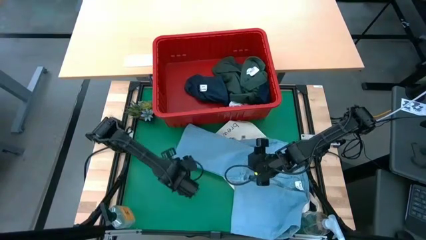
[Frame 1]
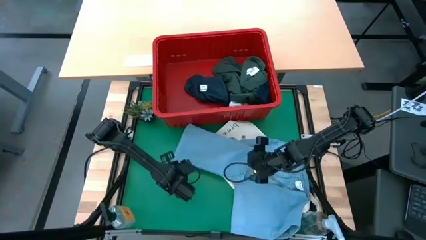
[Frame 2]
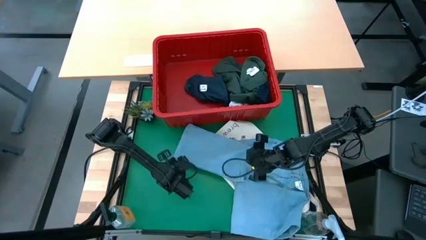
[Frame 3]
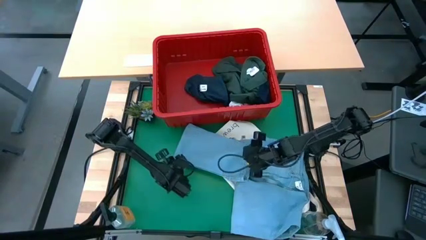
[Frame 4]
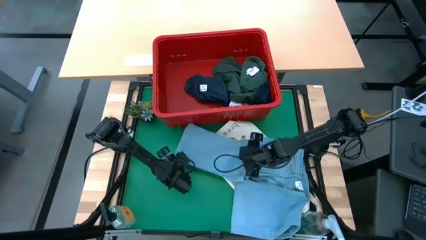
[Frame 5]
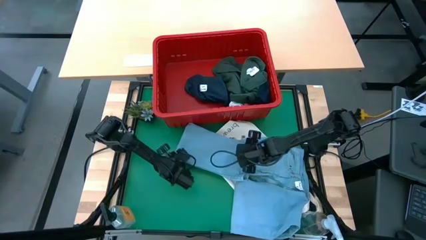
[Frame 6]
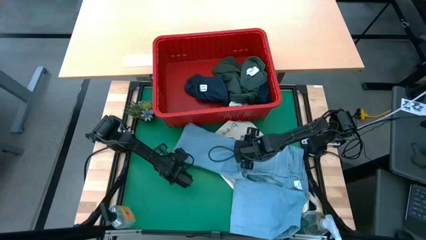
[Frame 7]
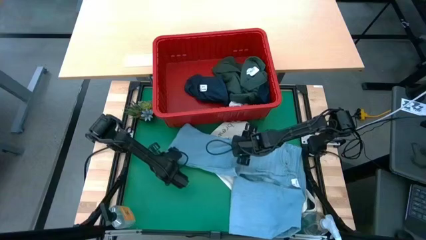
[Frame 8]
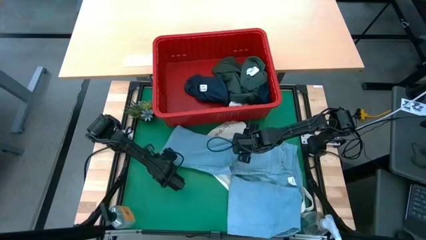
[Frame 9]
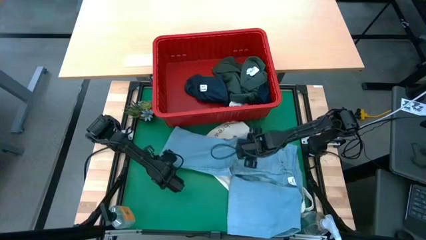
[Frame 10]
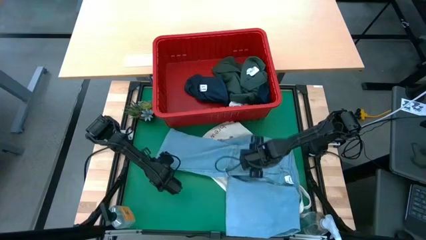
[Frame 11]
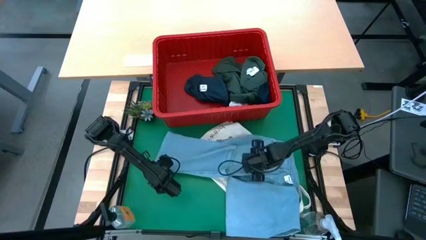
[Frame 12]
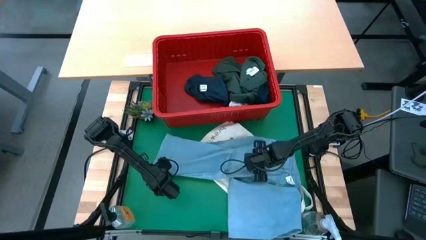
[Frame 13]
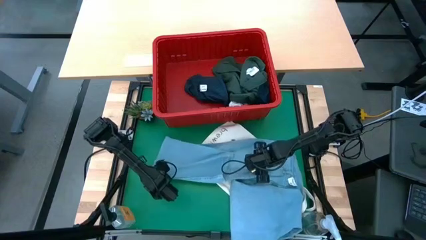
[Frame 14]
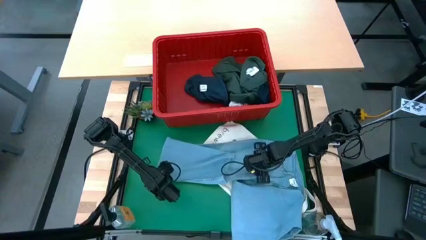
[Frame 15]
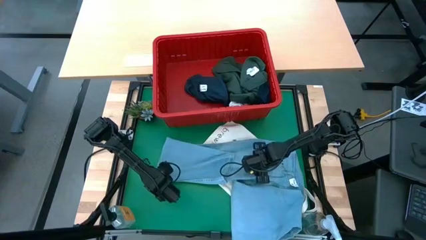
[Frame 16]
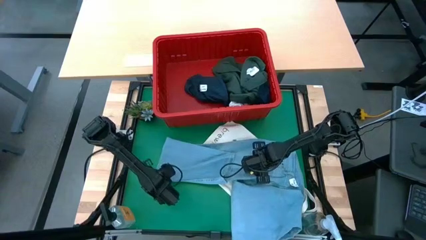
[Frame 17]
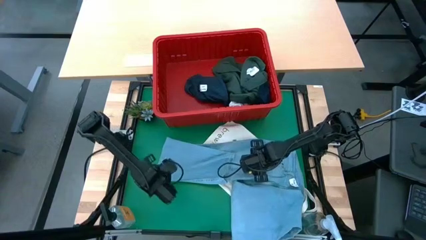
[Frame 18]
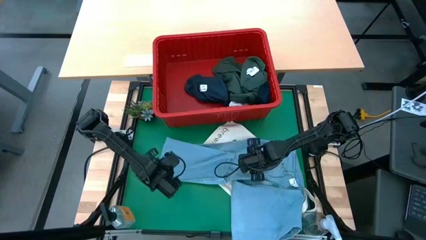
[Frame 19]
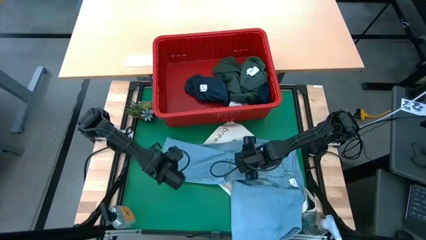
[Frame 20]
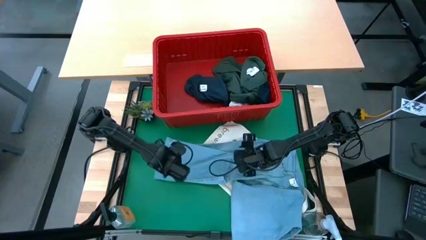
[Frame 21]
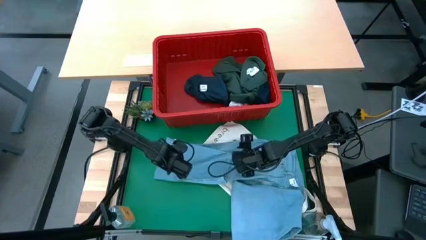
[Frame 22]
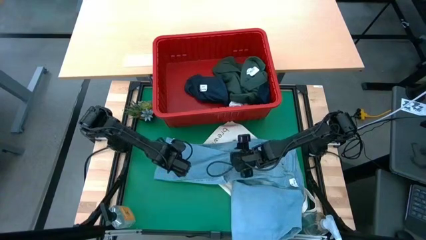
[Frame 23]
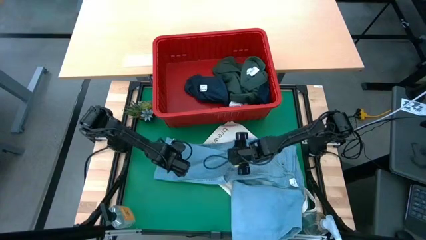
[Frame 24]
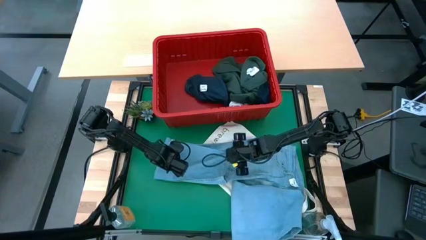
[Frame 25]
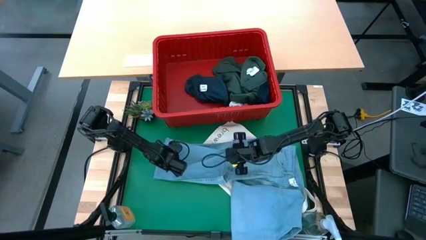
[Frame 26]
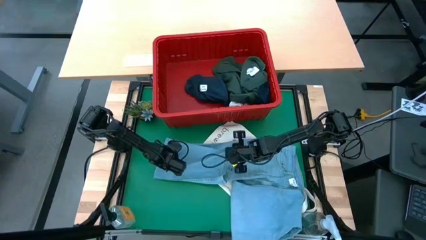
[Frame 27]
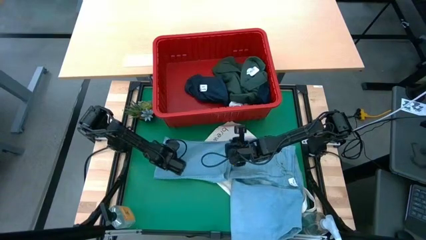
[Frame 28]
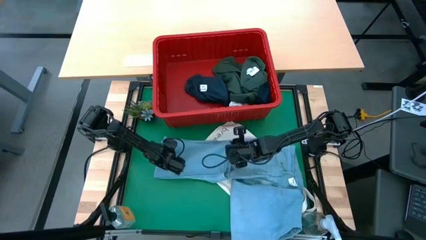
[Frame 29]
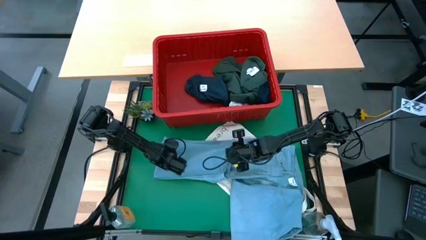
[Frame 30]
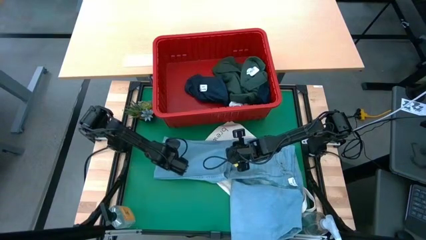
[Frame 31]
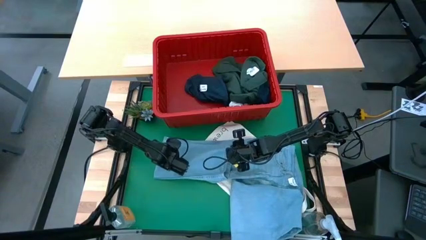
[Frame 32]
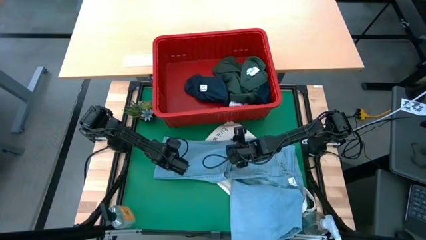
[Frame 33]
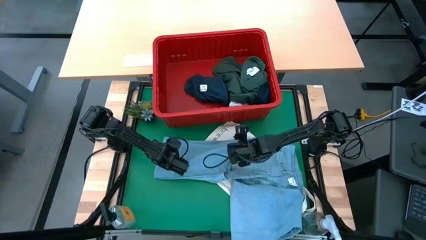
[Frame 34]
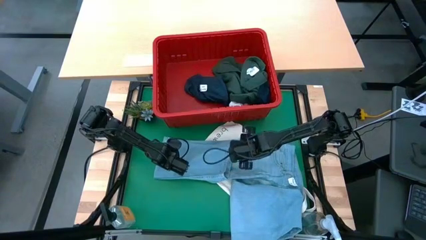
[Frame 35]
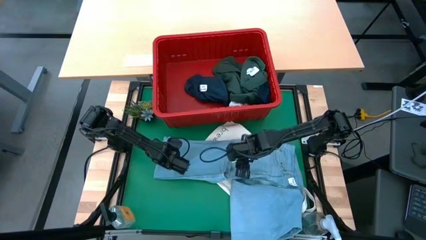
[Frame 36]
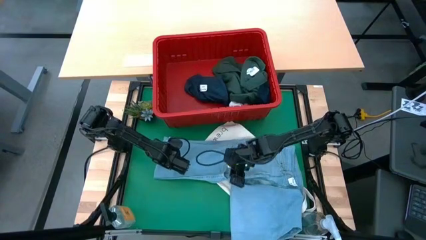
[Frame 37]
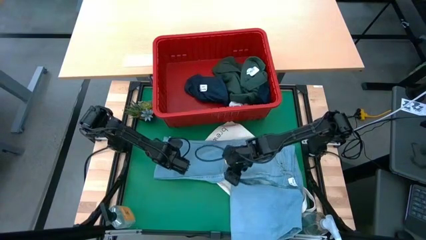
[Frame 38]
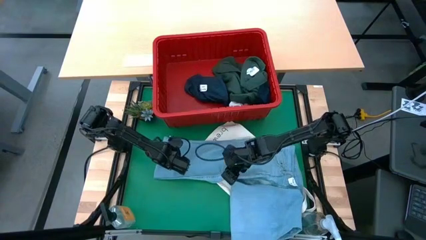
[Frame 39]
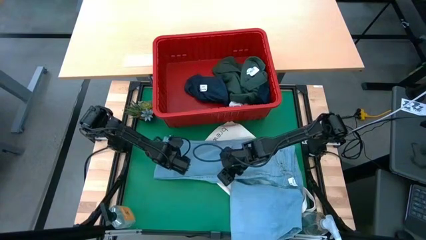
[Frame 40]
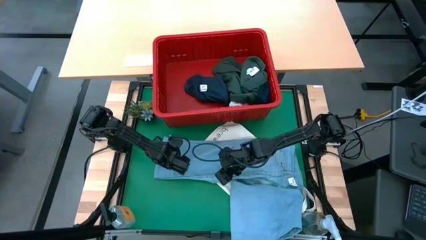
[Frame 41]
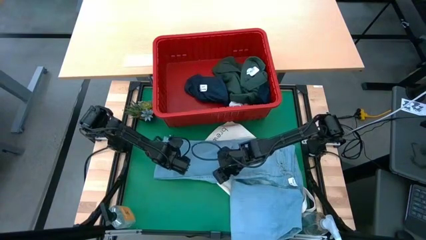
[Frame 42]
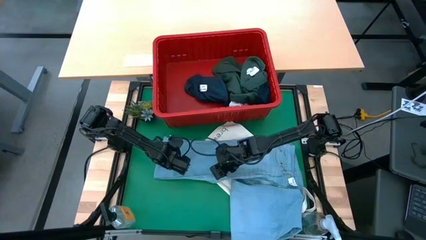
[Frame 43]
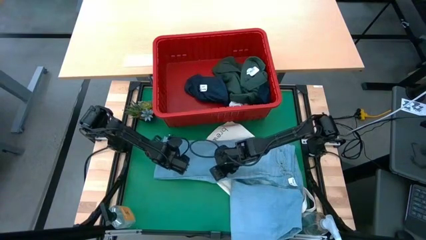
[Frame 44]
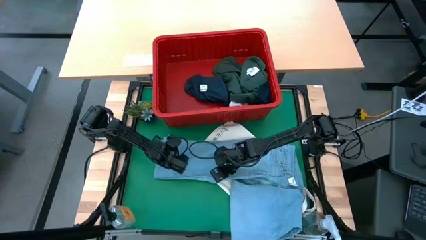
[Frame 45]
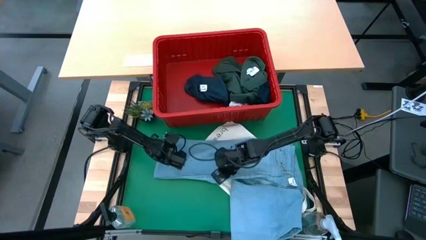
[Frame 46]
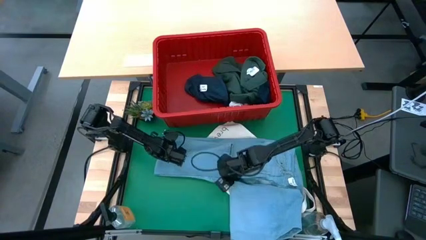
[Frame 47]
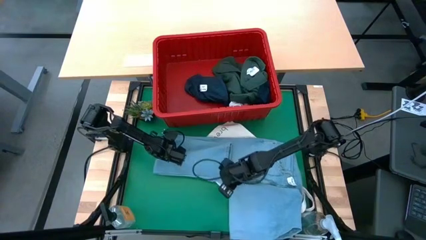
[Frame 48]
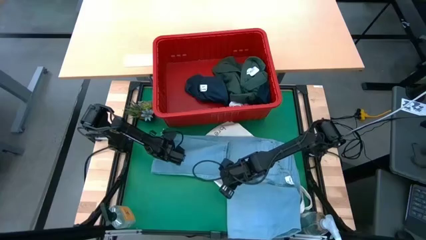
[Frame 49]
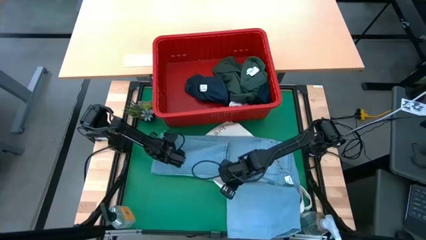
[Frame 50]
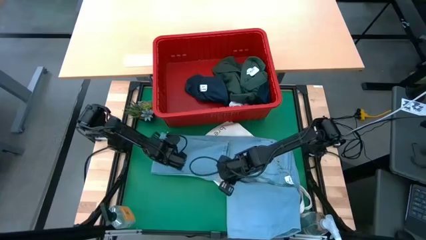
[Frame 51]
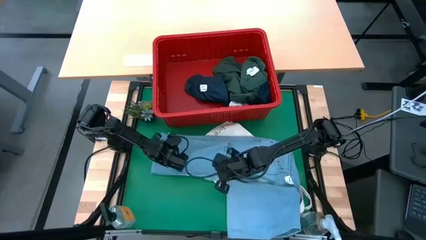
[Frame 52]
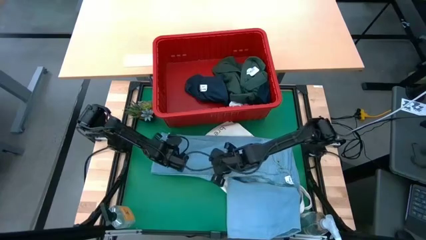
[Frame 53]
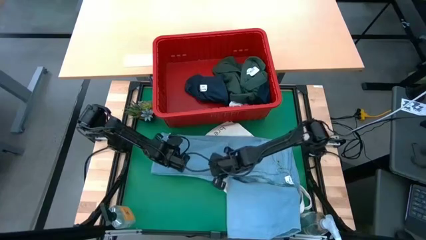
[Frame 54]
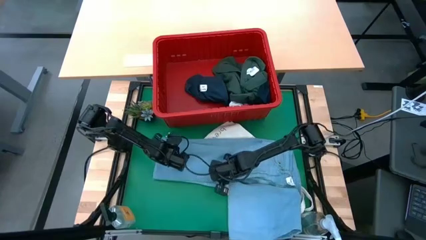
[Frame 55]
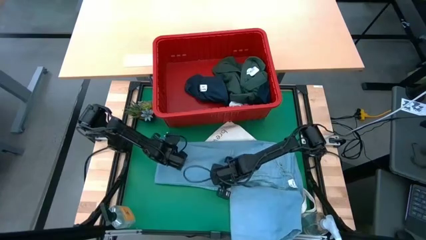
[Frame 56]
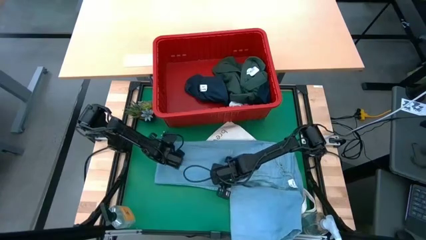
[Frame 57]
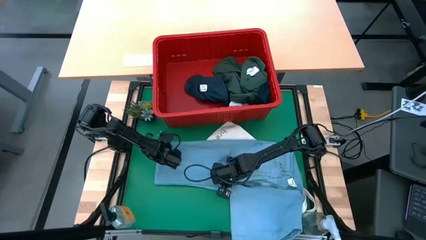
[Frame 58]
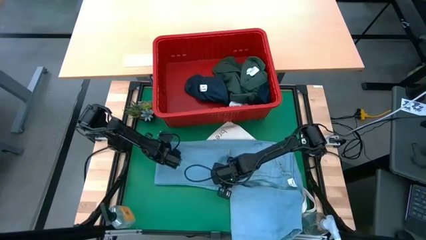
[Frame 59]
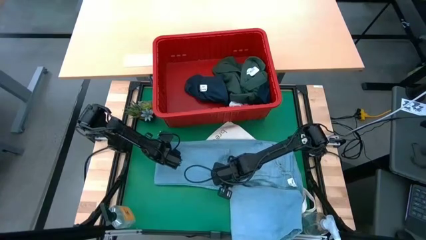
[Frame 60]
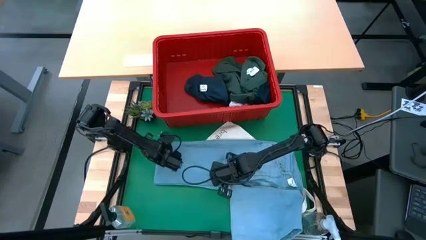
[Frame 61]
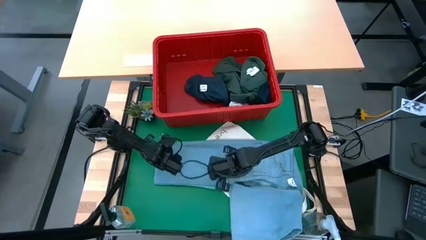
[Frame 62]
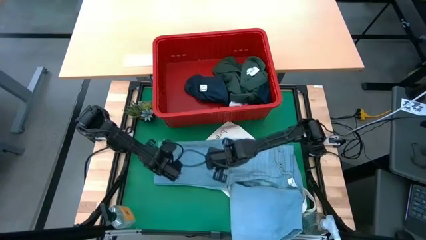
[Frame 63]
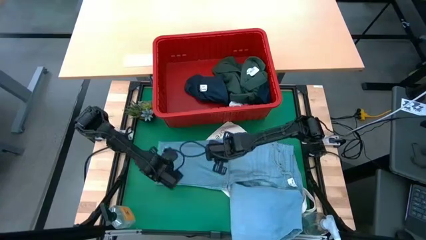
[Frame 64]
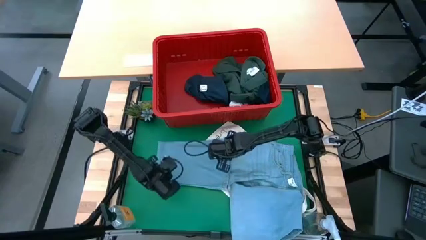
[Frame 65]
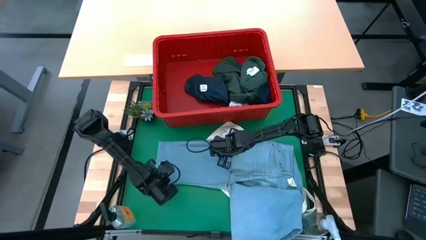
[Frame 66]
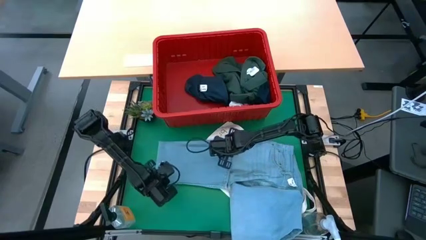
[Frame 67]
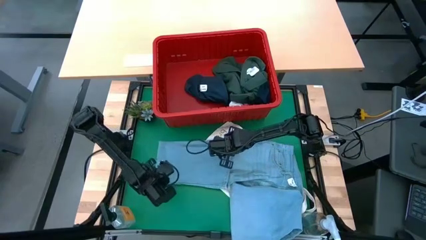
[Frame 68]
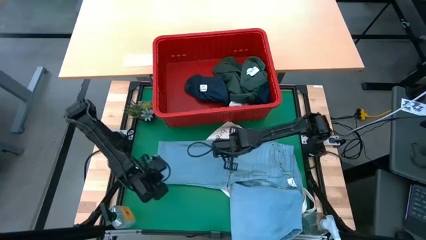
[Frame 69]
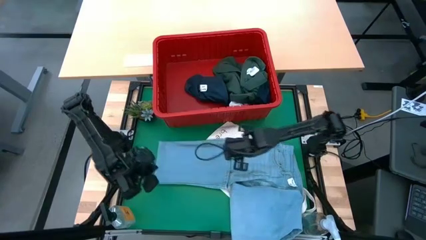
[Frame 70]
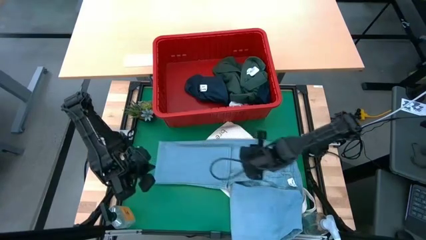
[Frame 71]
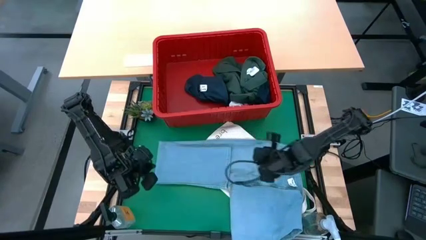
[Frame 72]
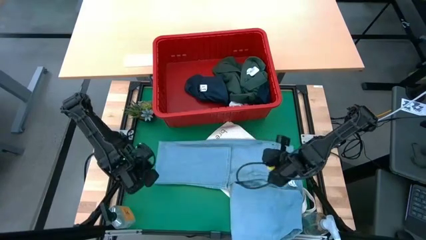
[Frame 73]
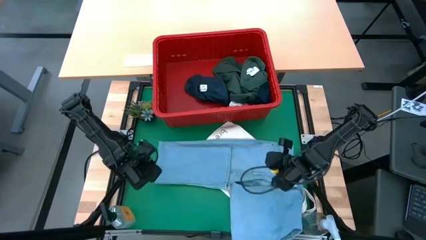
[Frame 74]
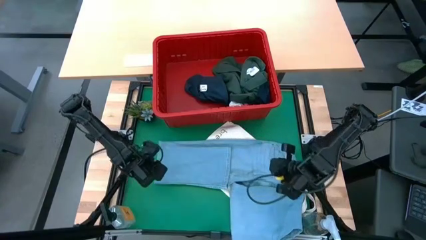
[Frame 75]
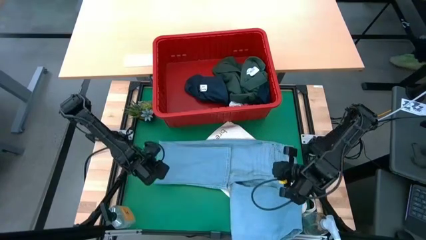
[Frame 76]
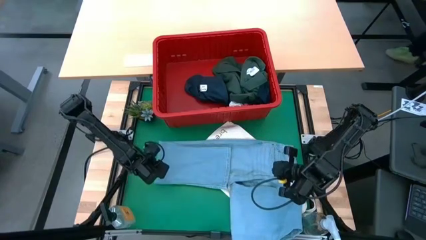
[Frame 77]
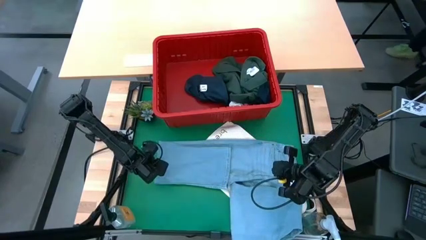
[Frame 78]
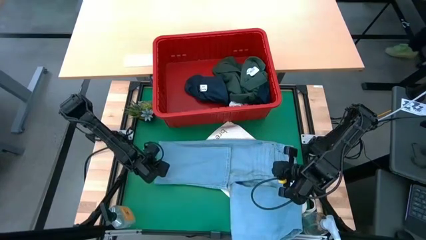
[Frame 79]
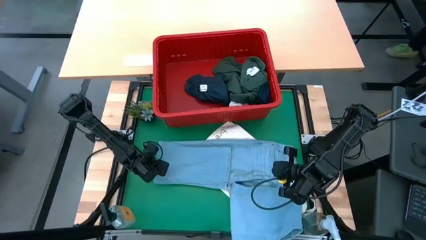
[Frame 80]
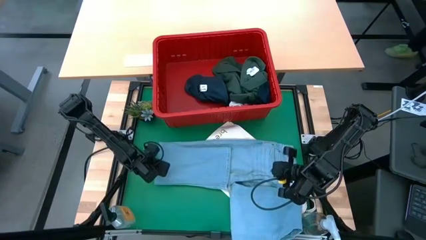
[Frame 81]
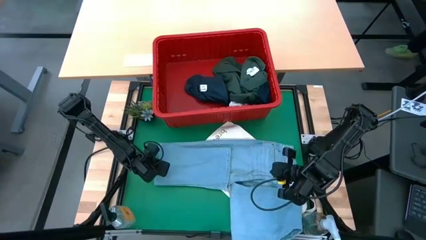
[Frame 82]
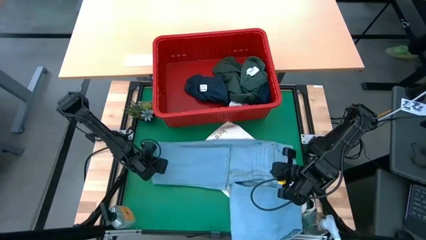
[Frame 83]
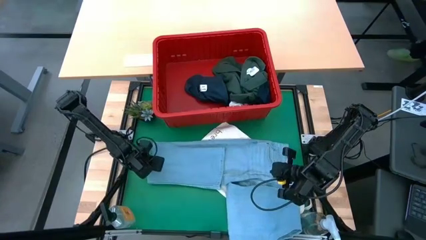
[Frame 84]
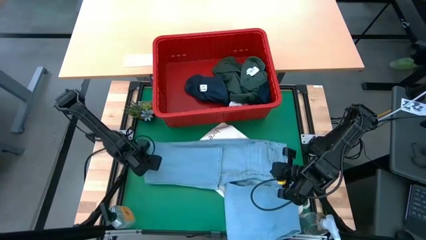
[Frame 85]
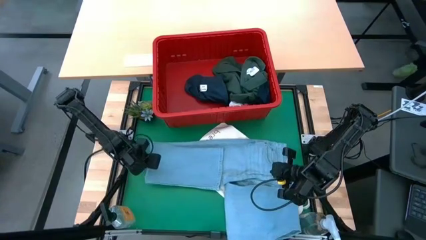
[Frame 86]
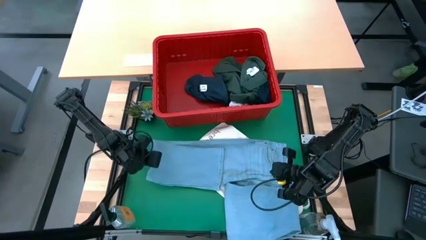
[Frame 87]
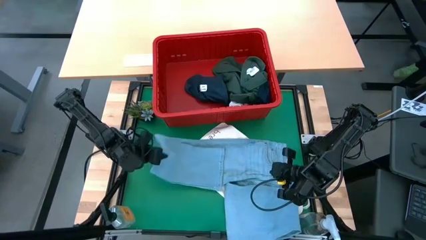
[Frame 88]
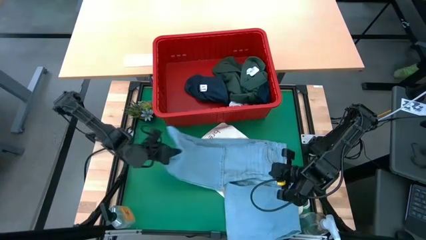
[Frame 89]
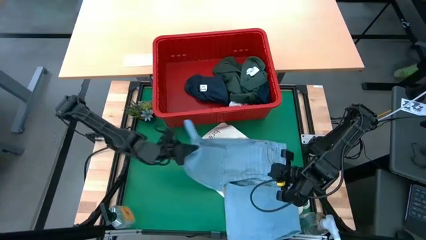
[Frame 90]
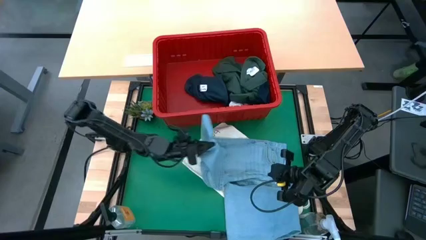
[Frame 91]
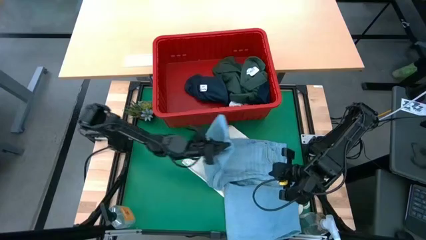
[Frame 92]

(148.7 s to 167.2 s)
Task: Fold laundry
Fold the light blue pants
